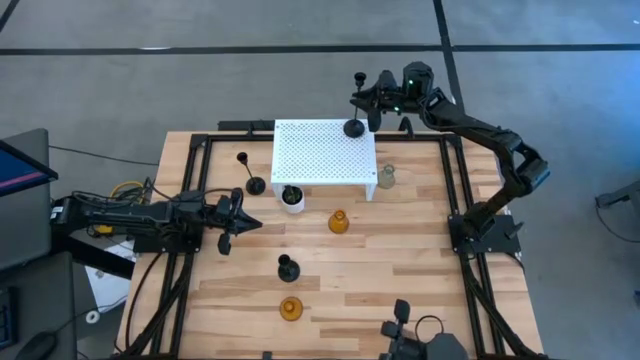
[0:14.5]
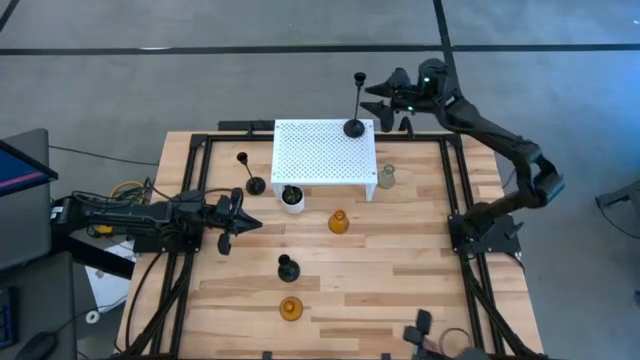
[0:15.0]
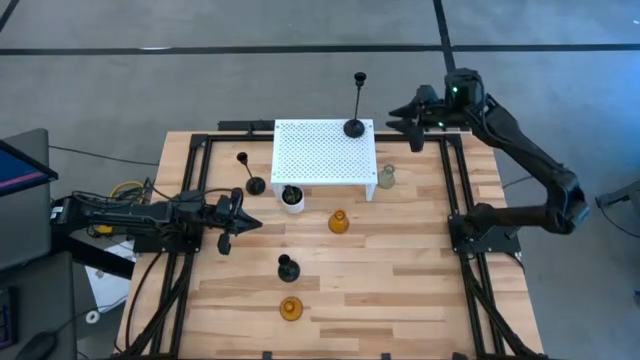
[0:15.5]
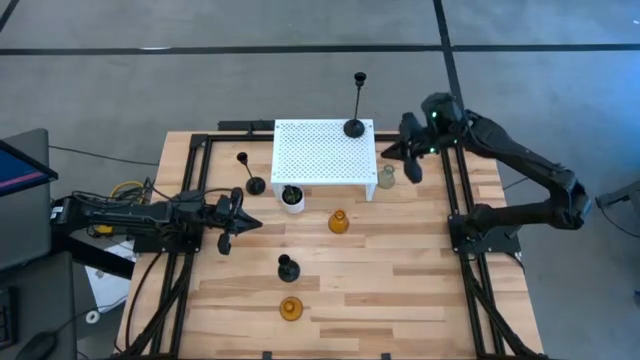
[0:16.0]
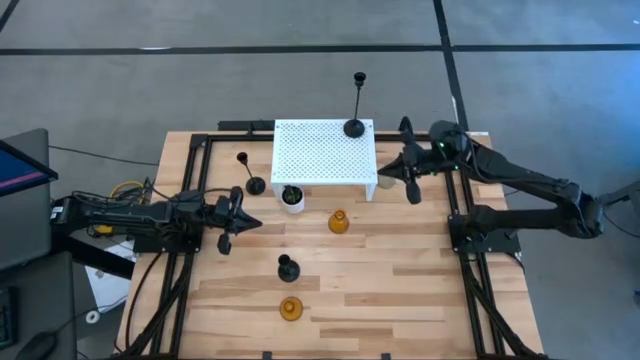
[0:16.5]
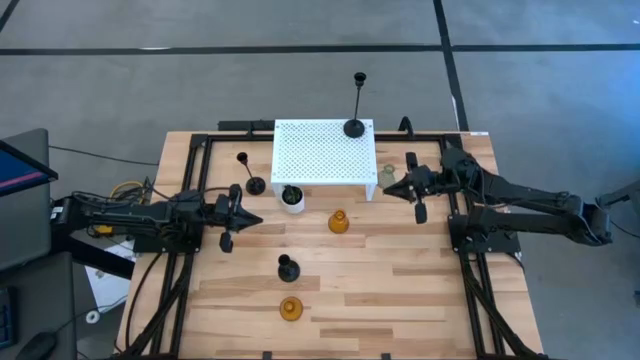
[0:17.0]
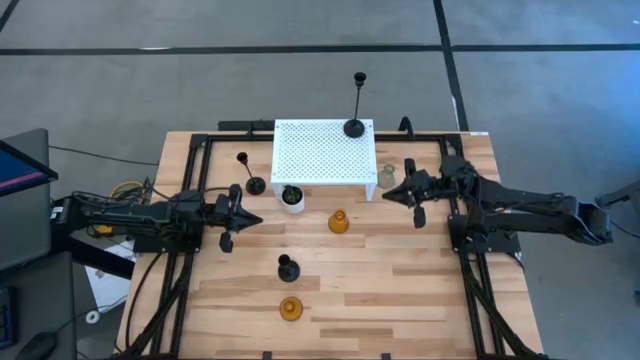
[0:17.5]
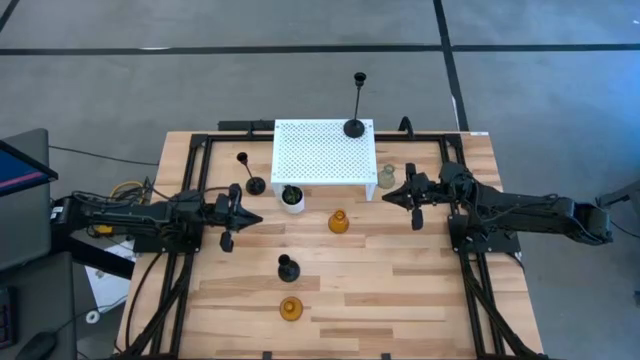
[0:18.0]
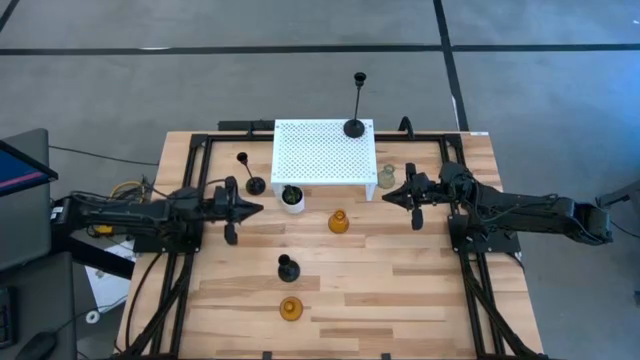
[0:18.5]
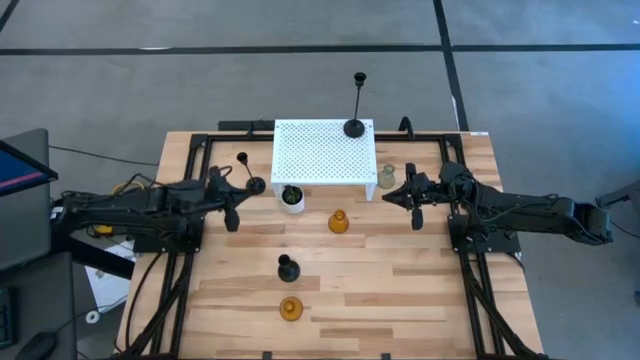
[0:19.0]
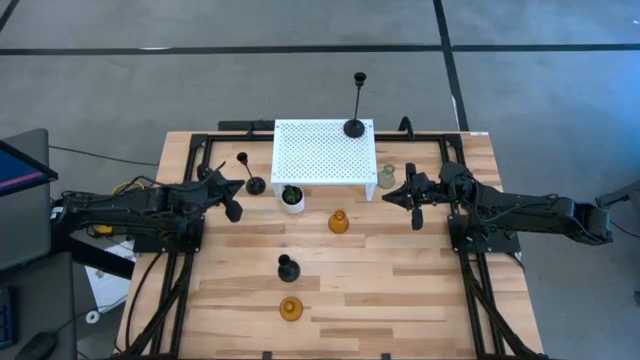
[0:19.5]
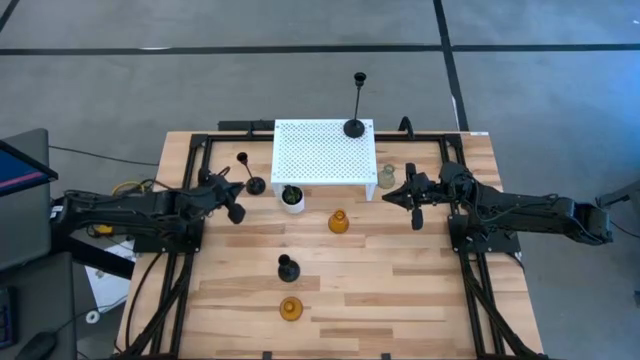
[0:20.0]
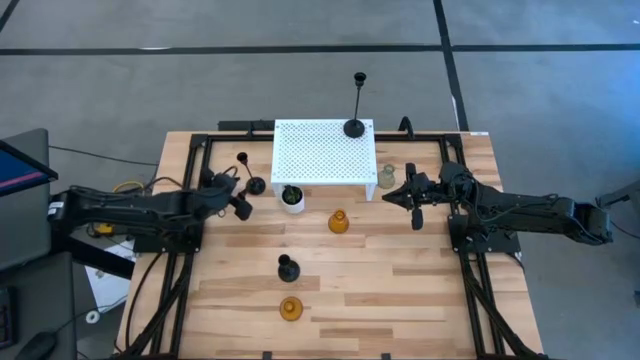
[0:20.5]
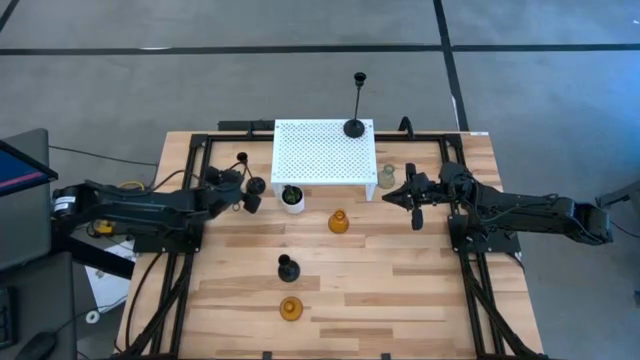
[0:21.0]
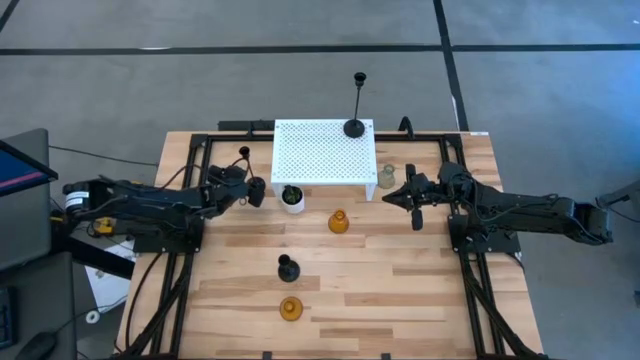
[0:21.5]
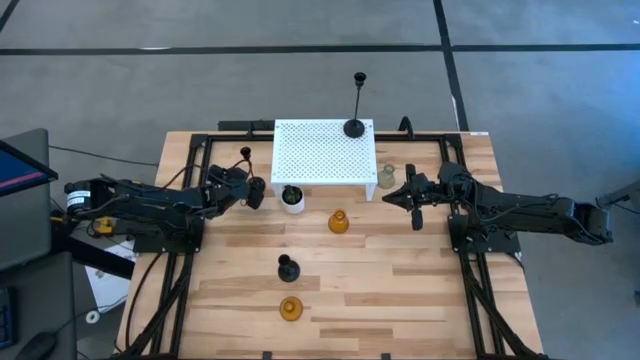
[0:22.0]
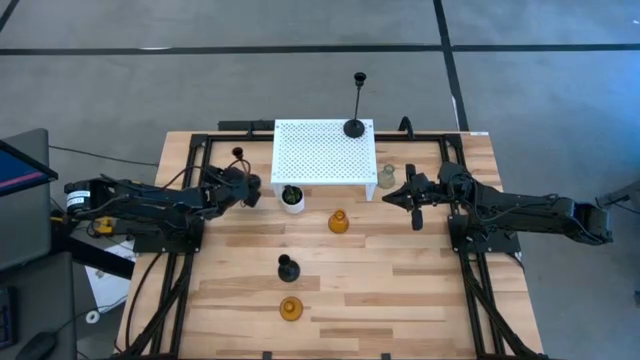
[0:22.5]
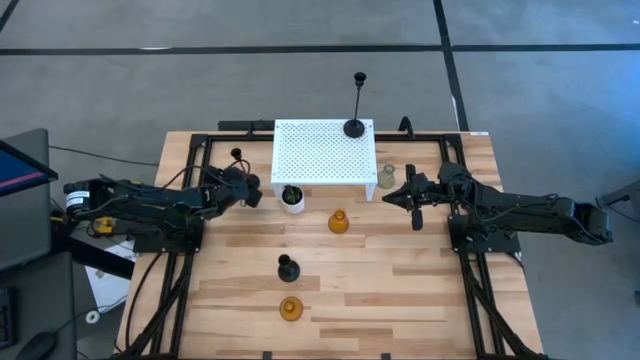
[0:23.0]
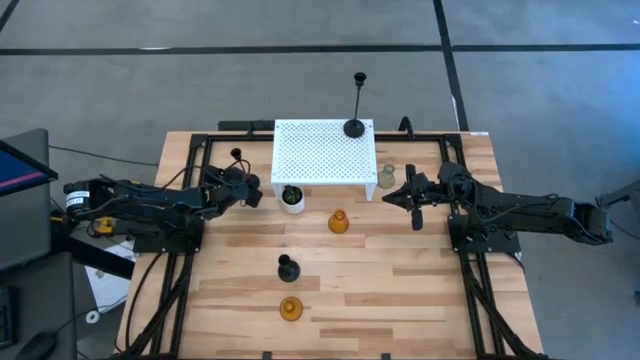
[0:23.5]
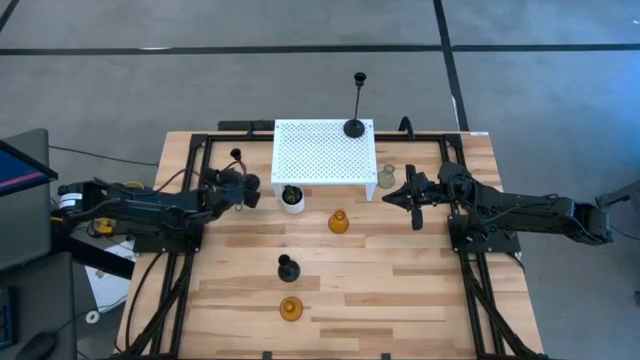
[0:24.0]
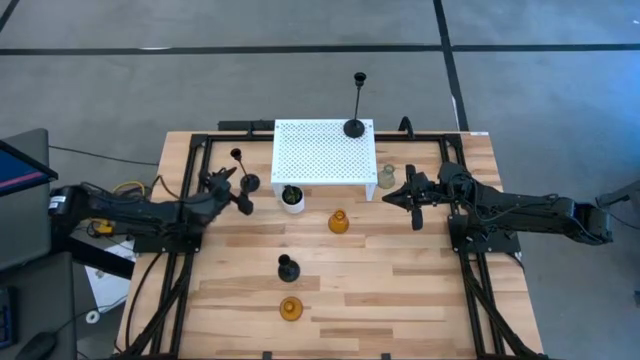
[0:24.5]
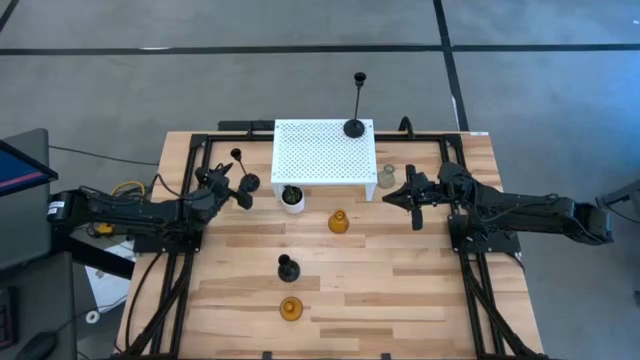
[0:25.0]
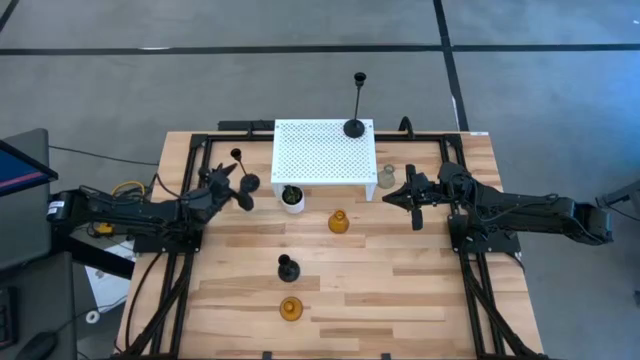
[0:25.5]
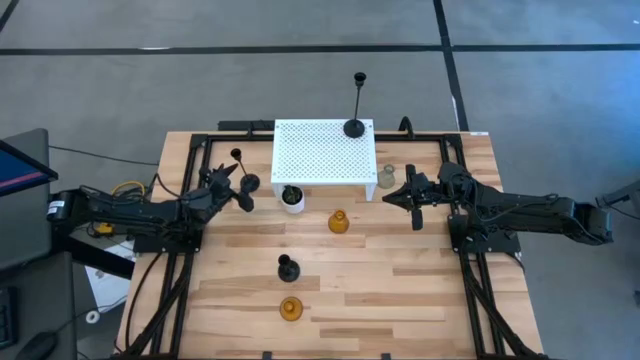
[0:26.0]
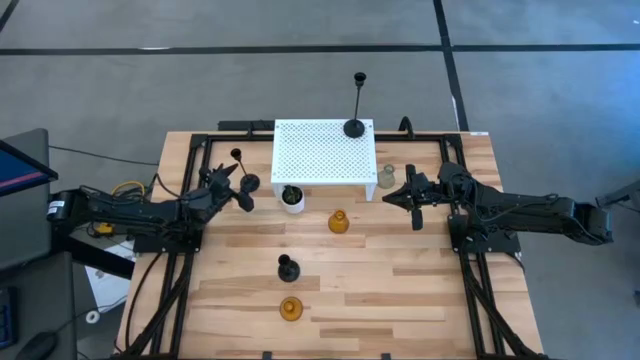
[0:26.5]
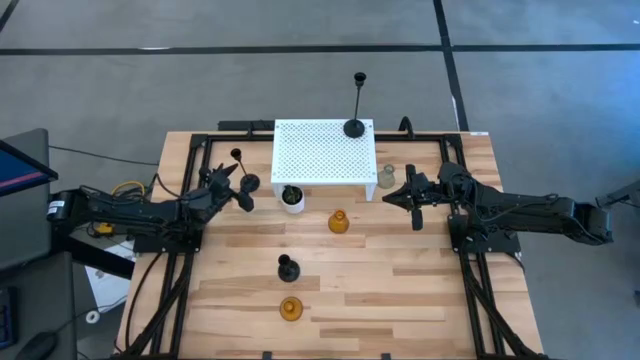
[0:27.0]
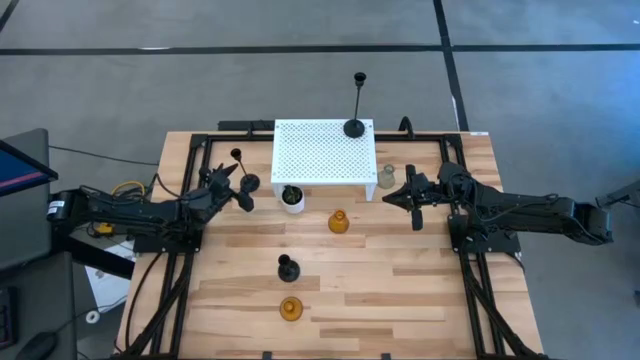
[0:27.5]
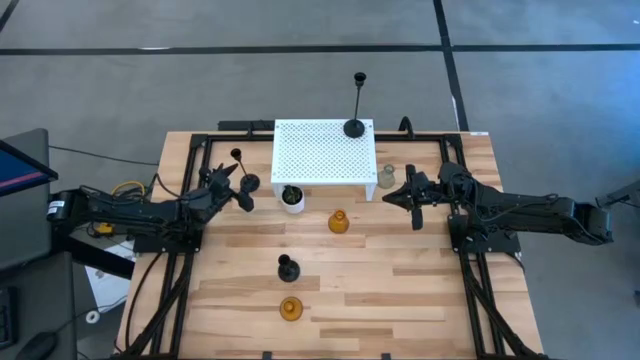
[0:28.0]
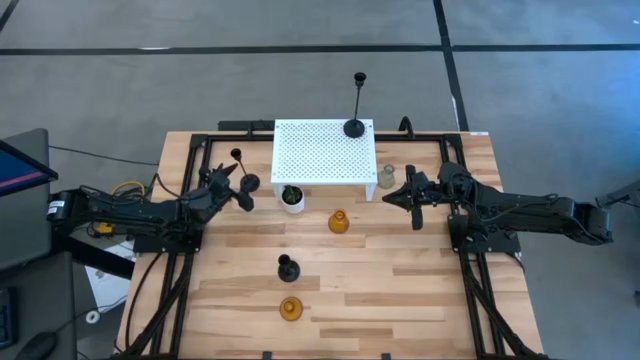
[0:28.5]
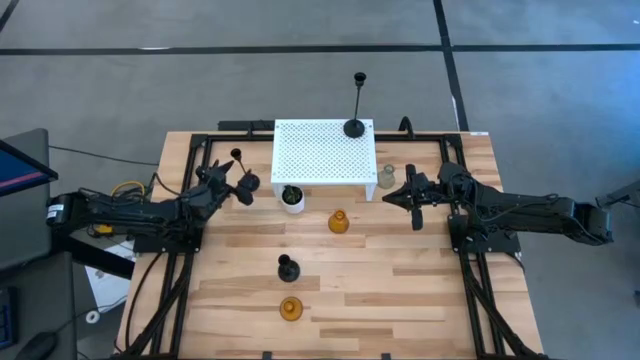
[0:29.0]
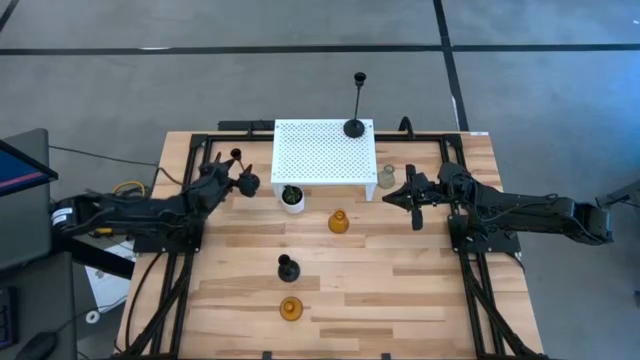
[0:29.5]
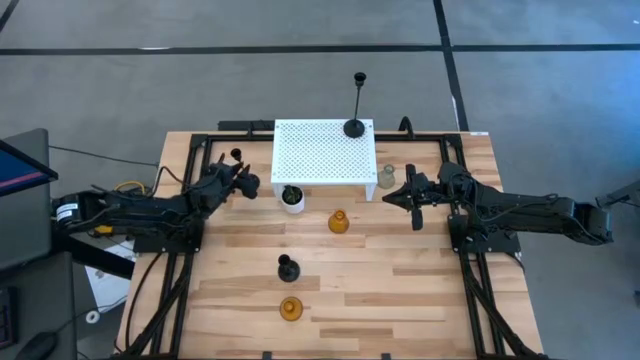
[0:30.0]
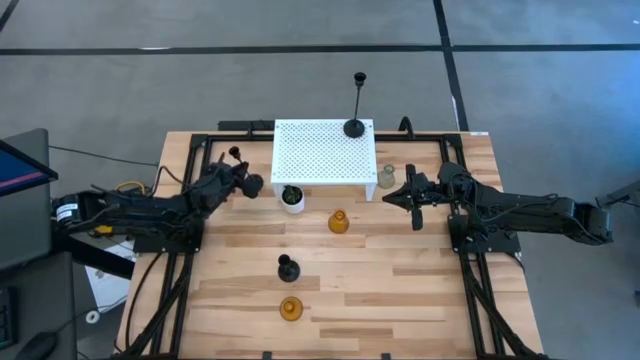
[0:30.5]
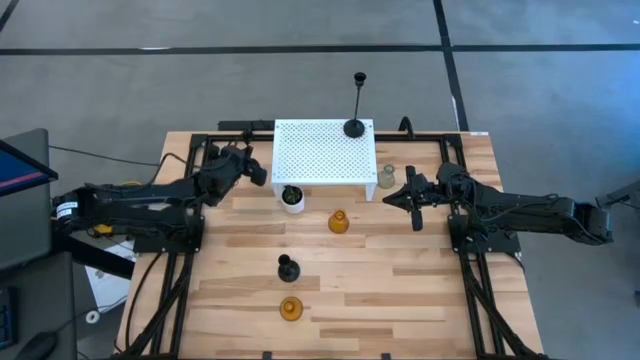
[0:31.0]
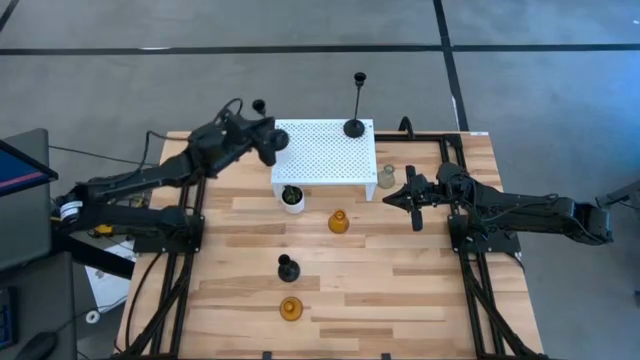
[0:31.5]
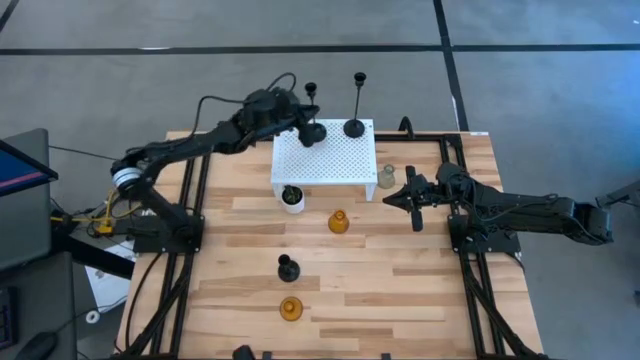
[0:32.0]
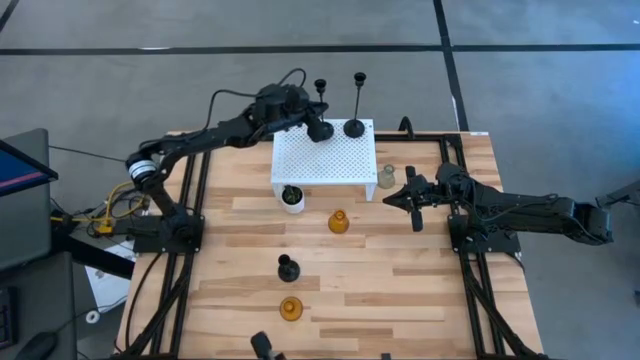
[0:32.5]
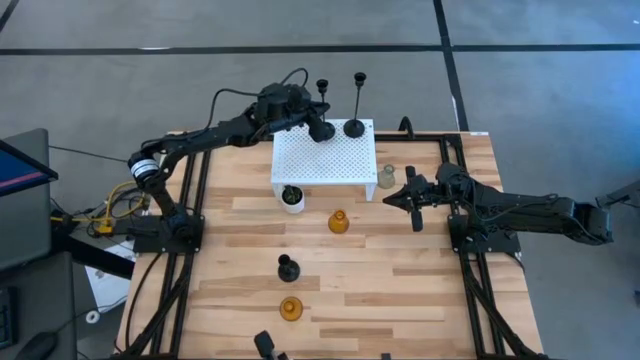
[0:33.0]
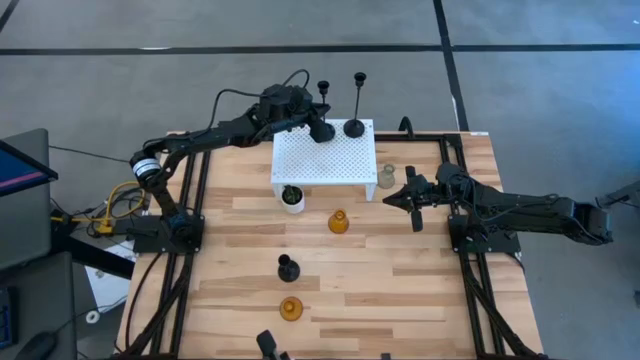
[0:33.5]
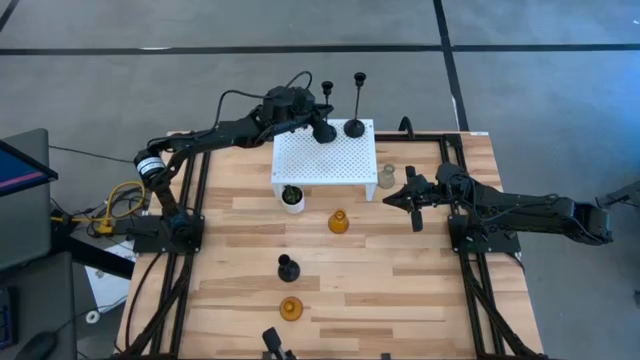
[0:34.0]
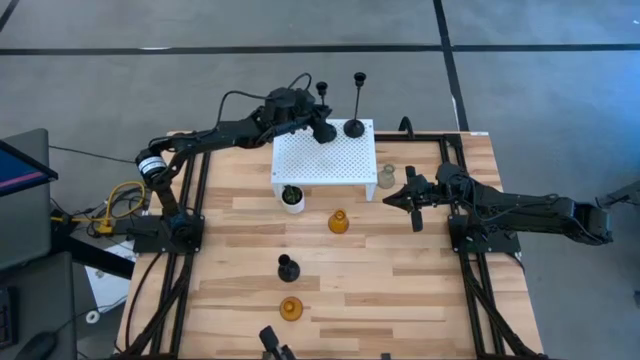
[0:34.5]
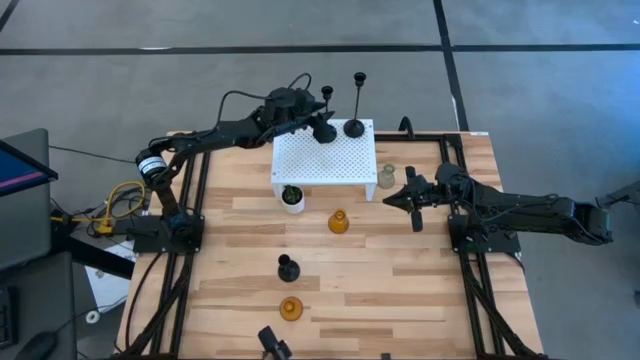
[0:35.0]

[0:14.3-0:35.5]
Task: Pick & Place candle stick holders
Put the top black candle holder on the shelf aligned with the other black candle holder
